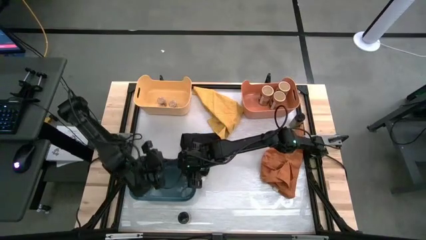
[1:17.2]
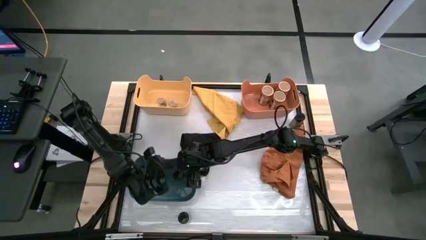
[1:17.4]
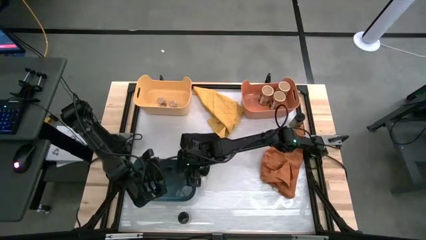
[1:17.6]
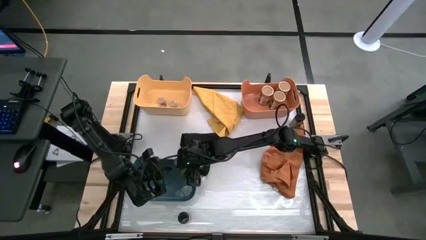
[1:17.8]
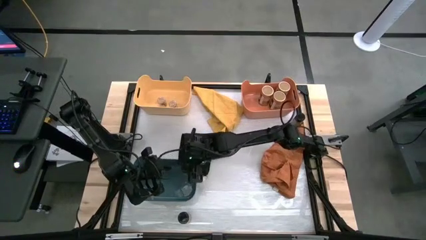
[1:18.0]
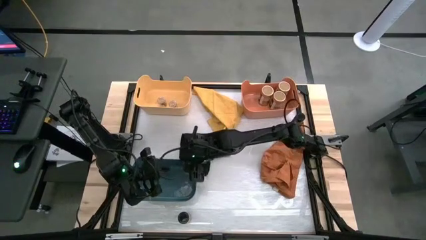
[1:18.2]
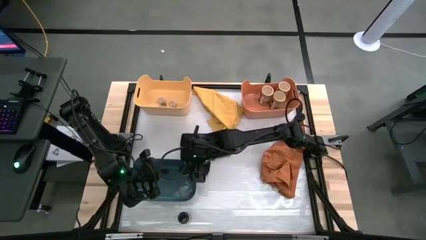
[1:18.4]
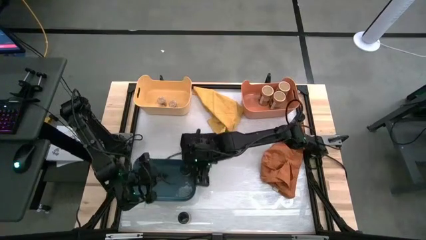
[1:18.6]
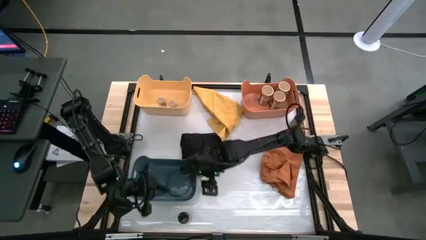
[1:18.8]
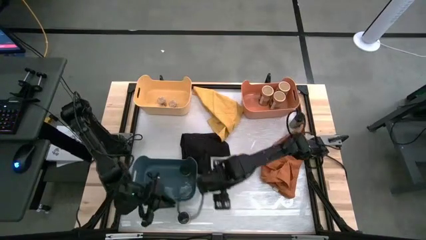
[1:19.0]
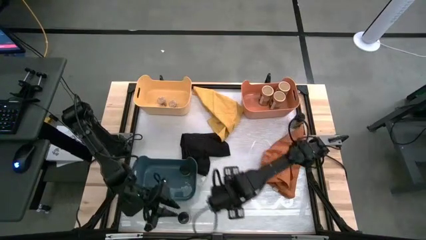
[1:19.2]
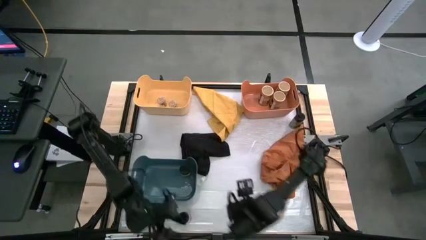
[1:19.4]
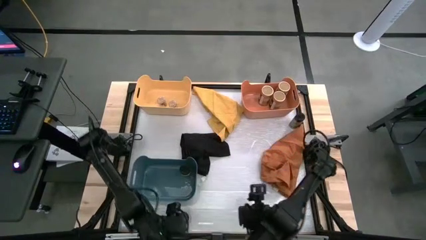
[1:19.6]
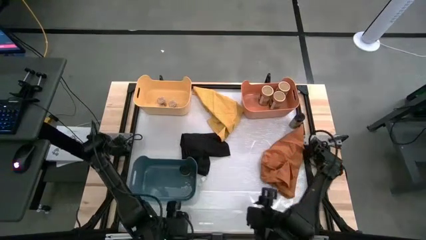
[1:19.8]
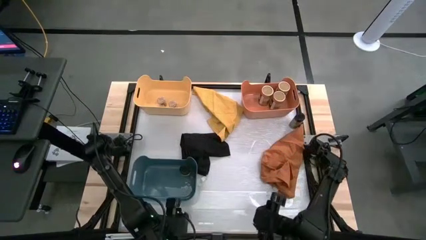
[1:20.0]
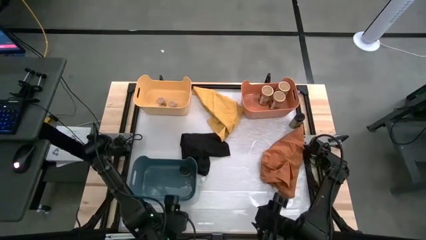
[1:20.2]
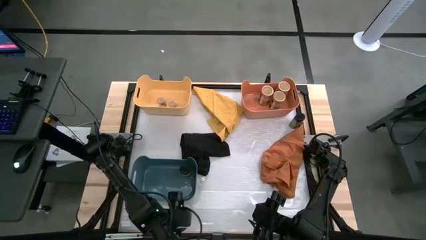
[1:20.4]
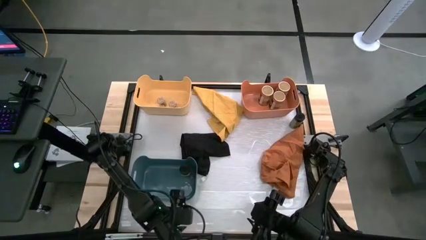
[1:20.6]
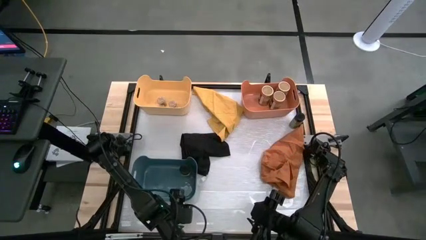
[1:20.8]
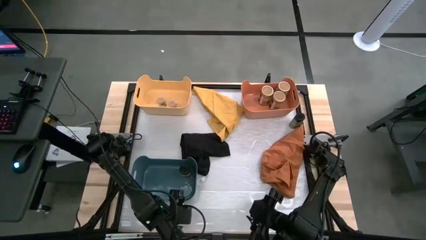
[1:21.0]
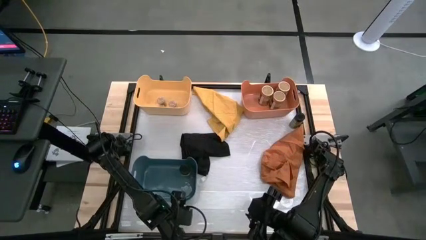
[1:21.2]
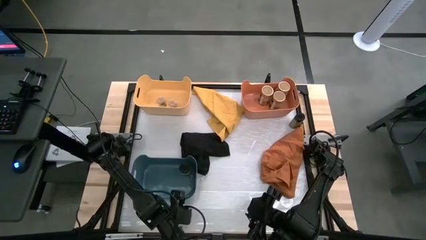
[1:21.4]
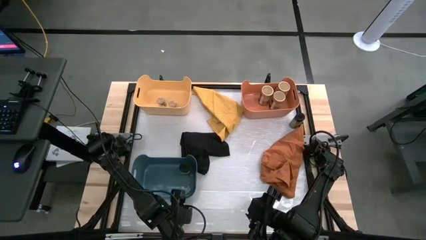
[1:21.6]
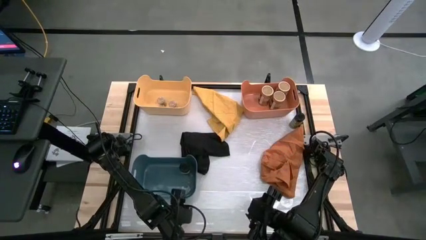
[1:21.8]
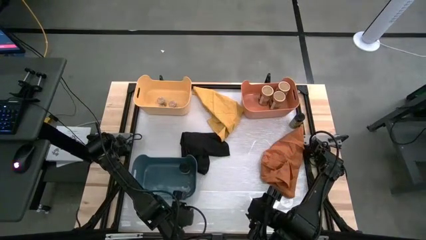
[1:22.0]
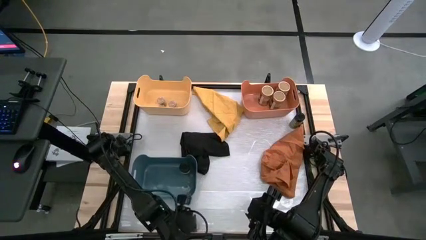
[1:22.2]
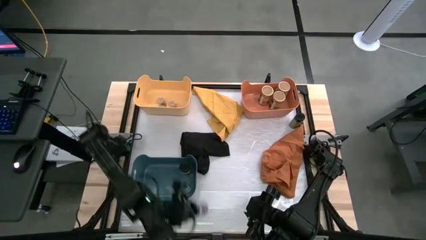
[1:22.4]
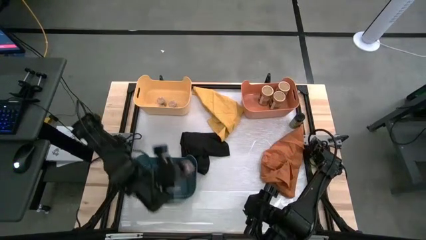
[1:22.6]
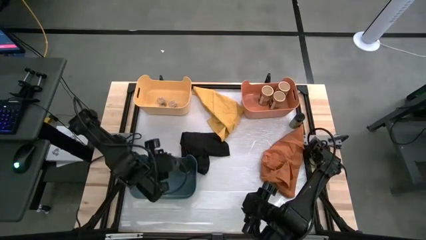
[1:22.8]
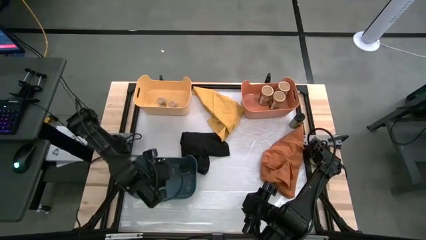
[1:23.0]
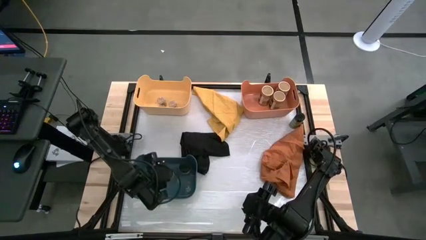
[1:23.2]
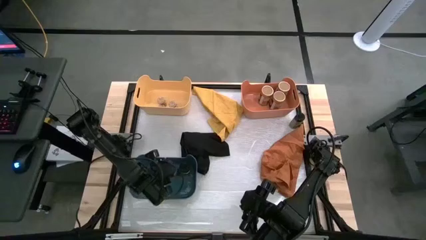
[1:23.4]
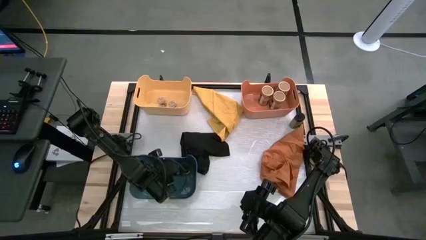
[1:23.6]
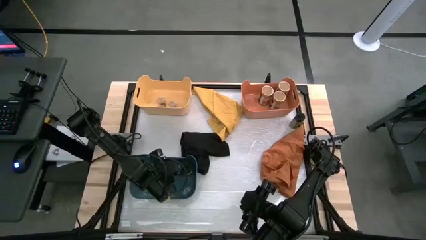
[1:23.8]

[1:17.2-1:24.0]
Task: Sort spices by type
Put the bottom black seasoning bottle into the blue bin

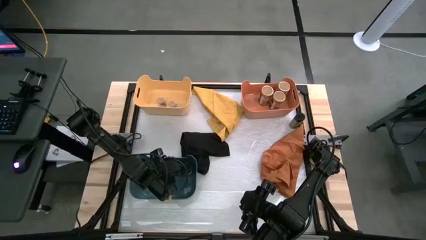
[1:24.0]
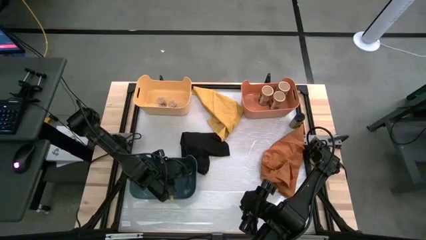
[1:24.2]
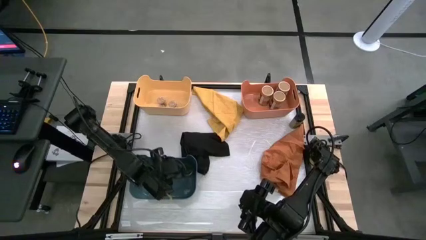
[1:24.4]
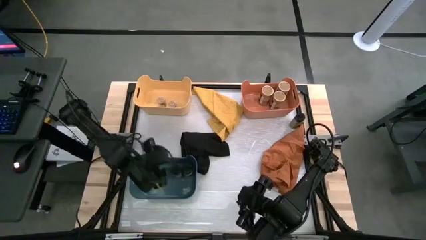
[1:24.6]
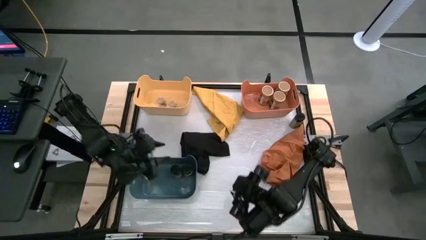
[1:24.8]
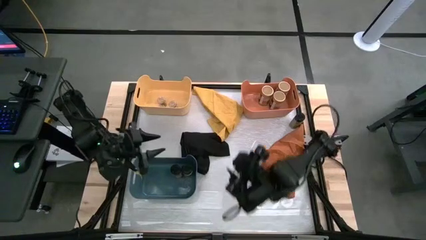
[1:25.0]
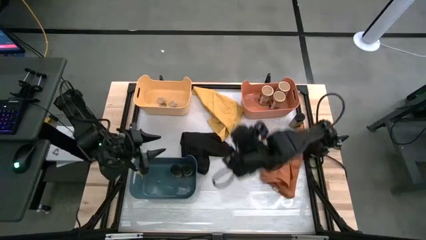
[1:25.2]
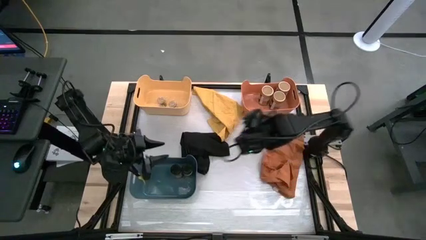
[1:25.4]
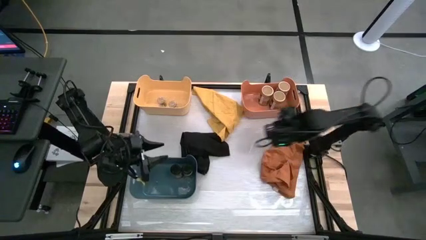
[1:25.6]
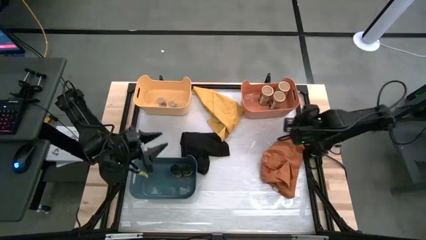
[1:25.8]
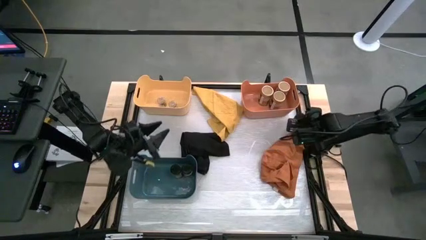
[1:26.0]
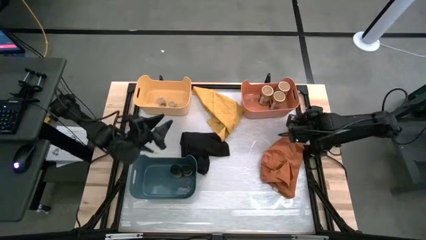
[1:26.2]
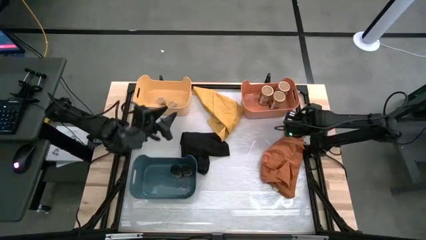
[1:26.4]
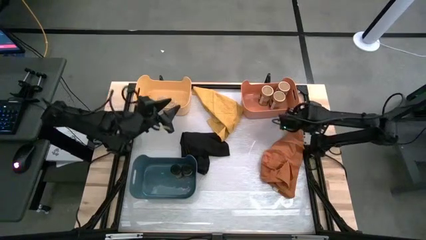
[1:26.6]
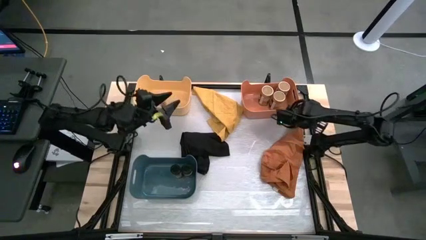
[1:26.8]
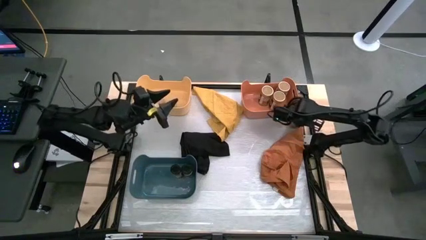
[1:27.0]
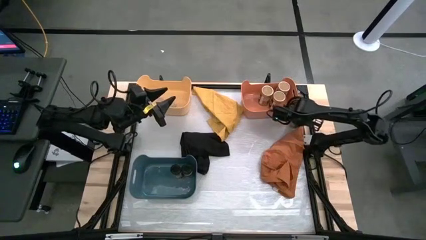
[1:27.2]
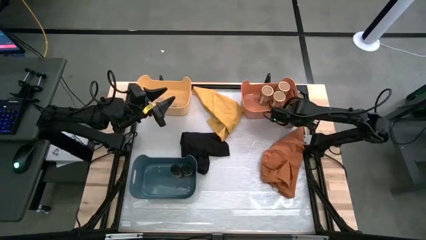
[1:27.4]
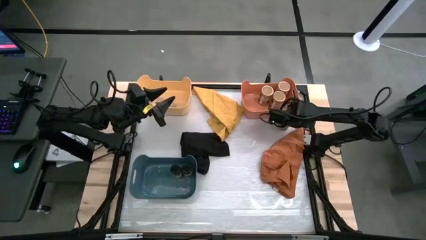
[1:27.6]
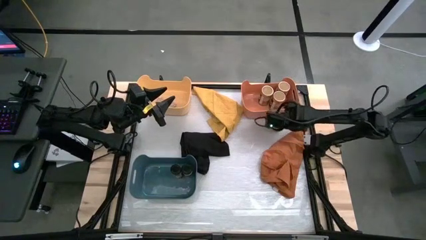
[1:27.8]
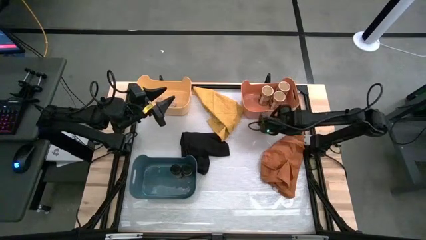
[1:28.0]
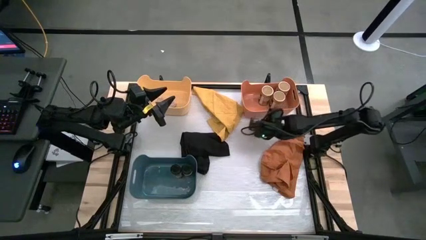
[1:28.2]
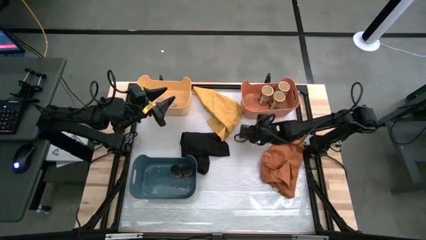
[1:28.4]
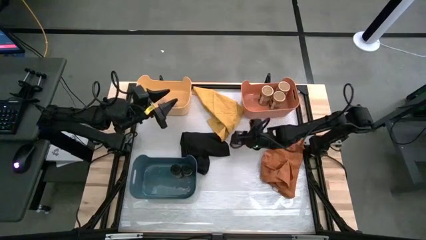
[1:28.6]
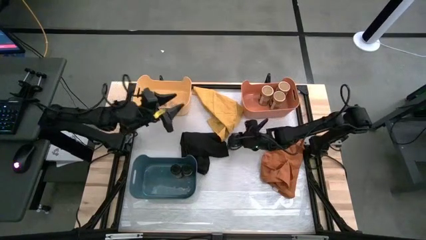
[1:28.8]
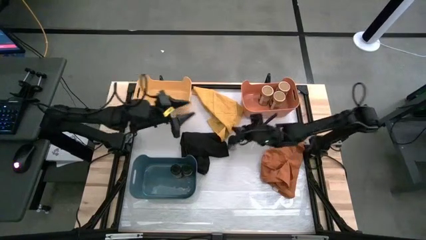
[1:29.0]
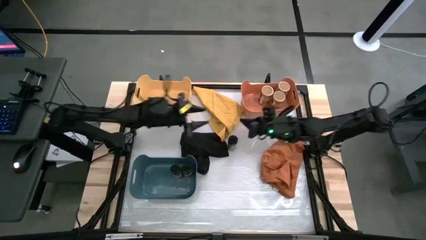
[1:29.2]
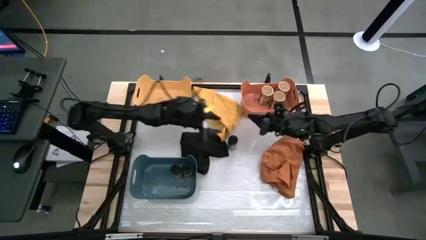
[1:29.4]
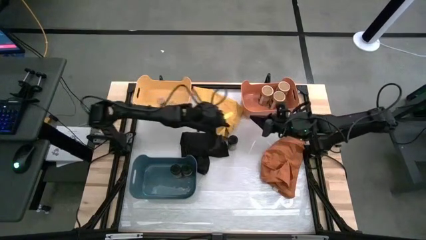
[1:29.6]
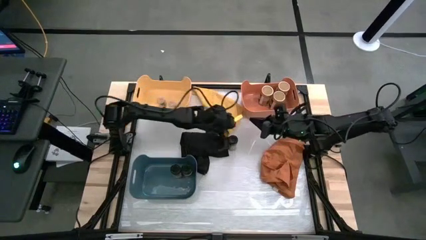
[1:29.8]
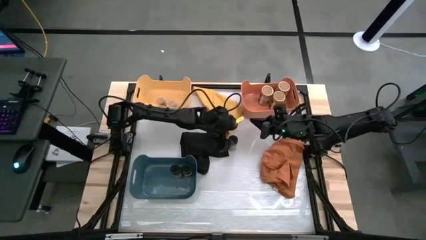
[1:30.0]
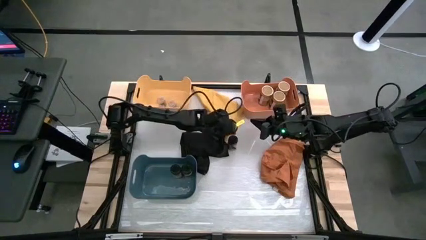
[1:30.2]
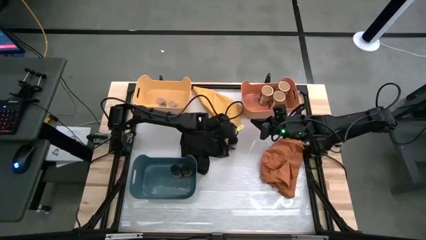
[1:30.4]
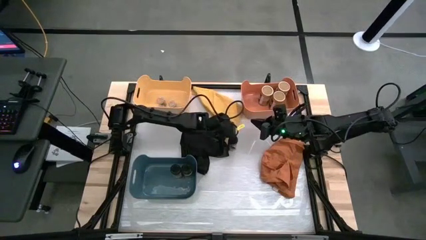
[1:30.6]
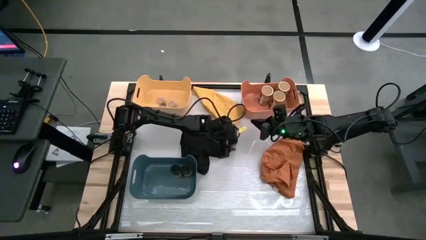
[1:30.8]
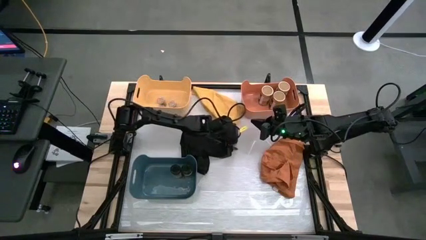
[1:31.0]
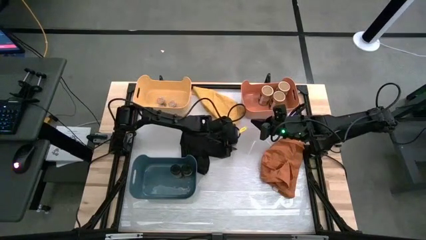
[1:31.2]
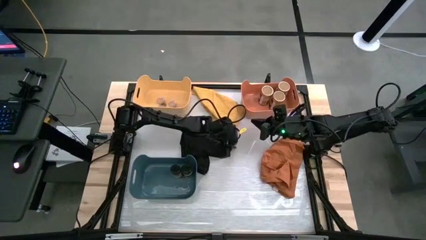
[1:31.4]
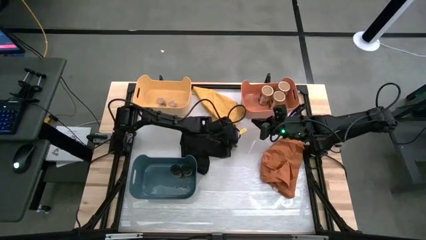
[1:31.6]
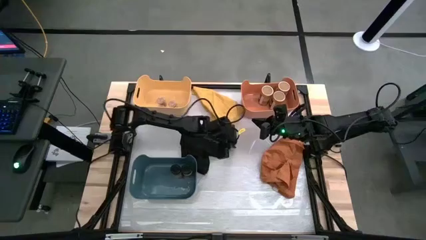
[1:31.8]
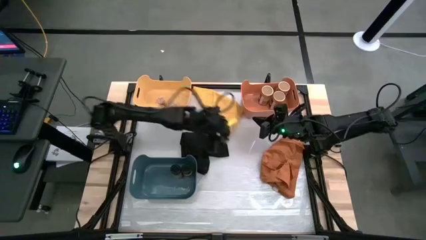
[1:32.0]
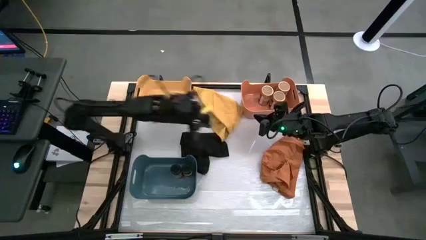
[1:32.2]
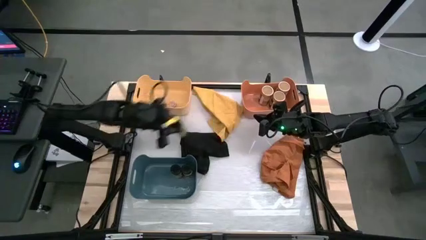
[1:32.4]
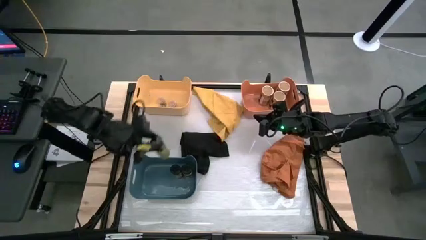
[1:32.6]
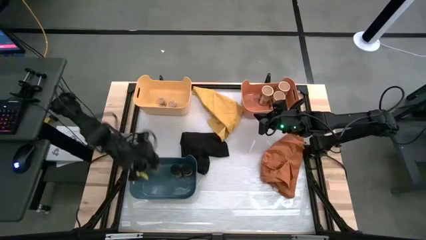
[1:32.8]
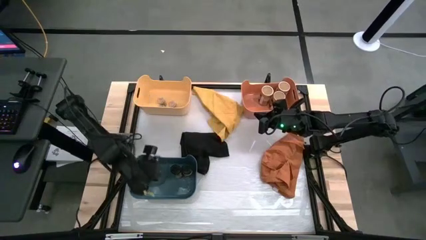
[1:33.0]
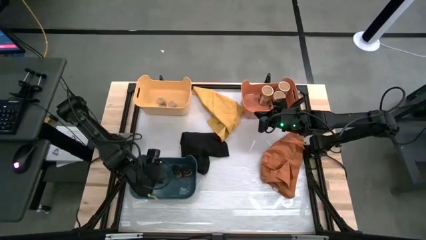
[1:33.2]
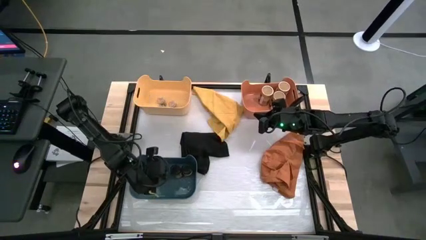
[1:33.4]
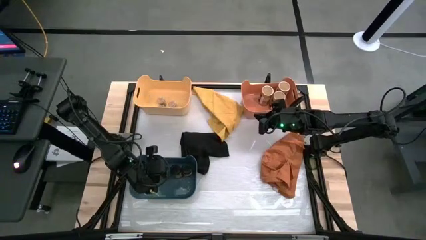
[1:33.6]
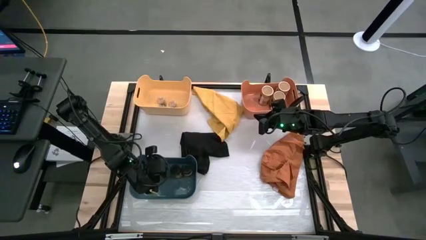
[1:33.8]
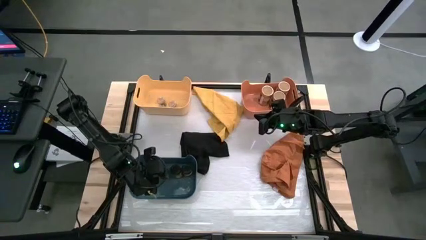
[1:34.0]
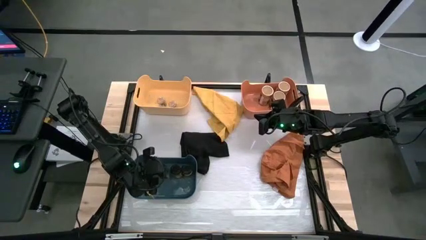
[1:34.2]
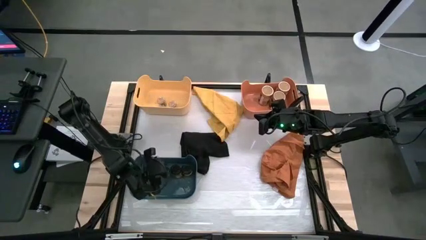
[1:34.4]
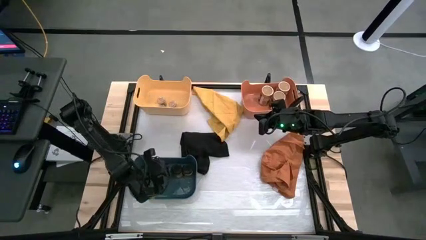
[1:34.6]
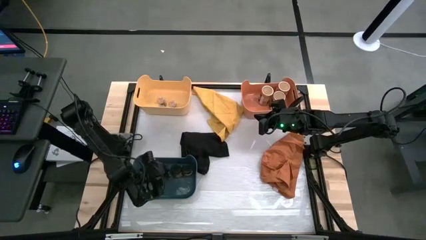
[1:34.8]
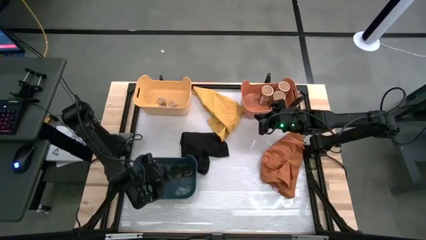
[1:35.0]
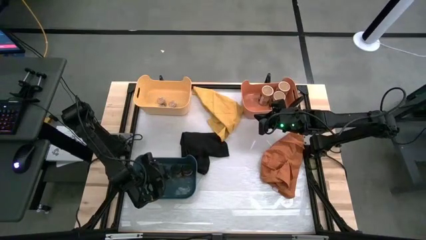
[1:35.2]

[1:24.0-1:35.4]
Put the black seasoning bottle into the blue bin
